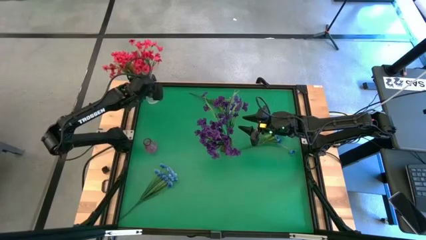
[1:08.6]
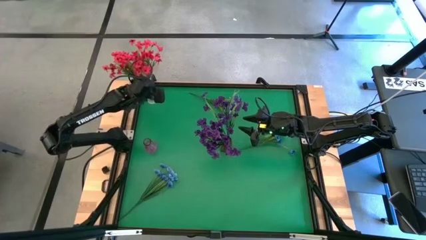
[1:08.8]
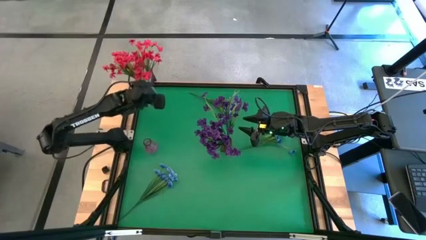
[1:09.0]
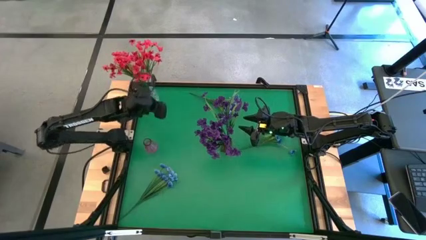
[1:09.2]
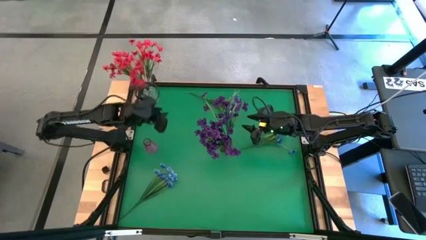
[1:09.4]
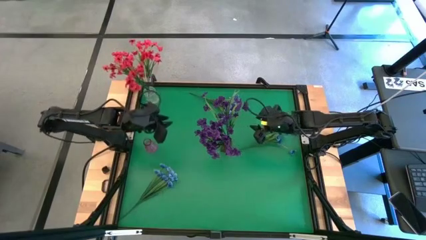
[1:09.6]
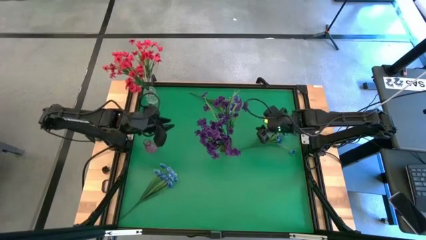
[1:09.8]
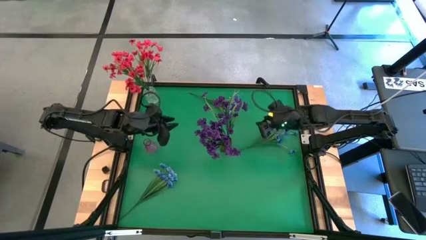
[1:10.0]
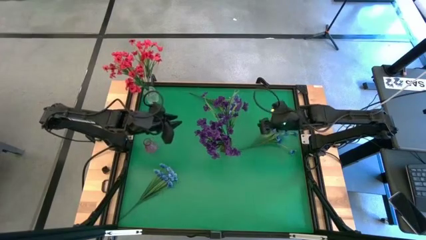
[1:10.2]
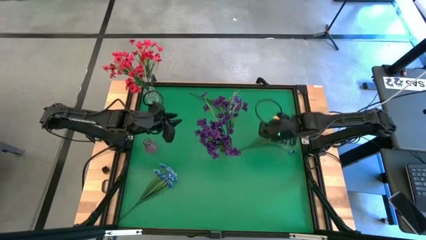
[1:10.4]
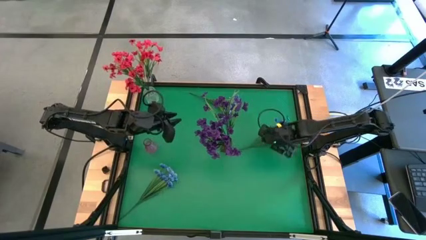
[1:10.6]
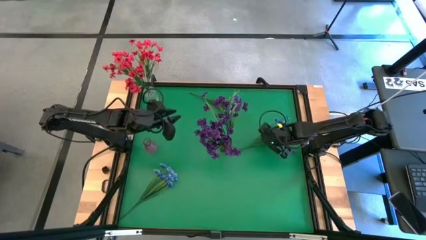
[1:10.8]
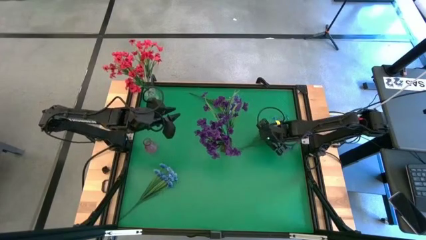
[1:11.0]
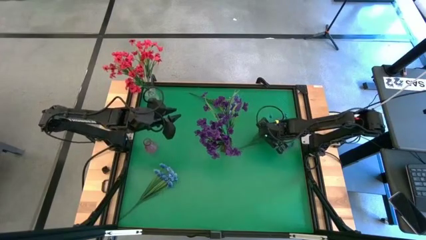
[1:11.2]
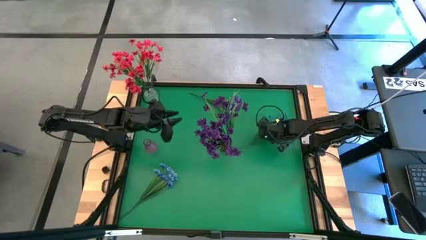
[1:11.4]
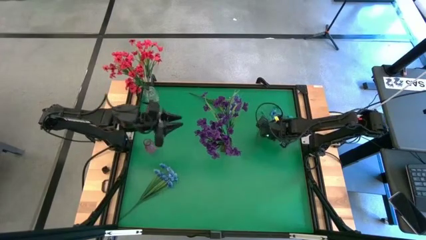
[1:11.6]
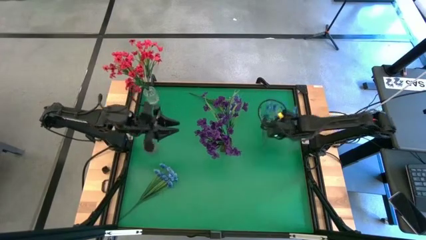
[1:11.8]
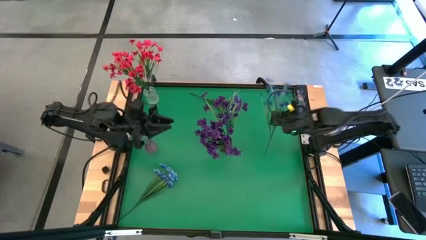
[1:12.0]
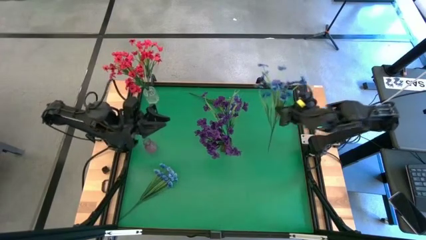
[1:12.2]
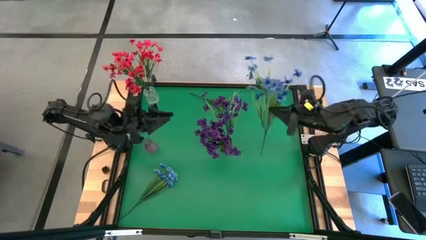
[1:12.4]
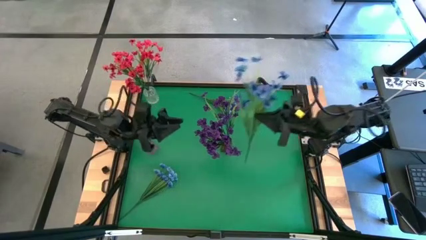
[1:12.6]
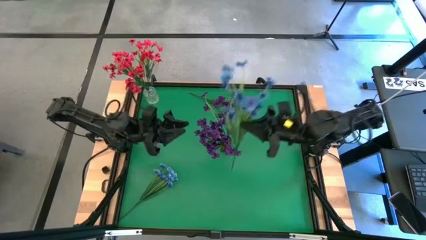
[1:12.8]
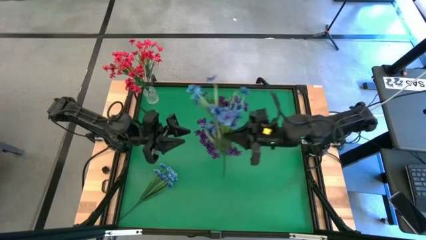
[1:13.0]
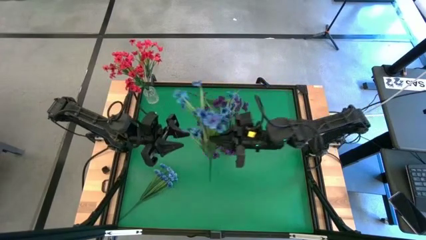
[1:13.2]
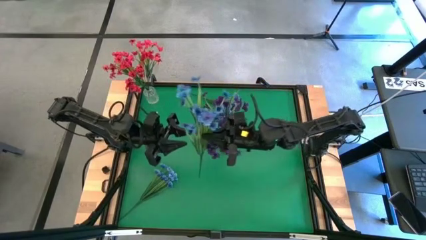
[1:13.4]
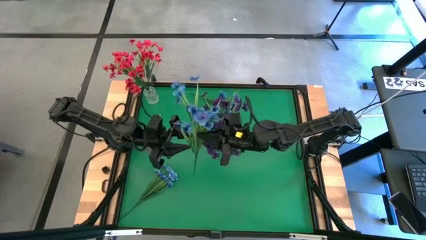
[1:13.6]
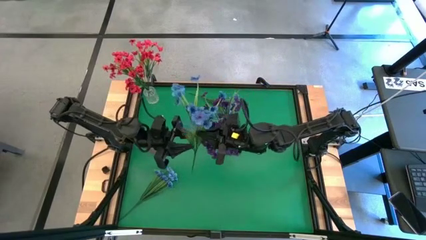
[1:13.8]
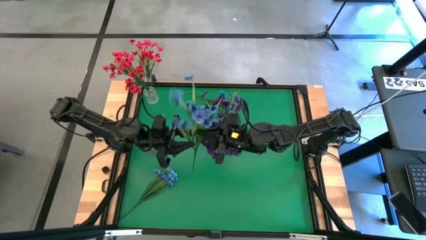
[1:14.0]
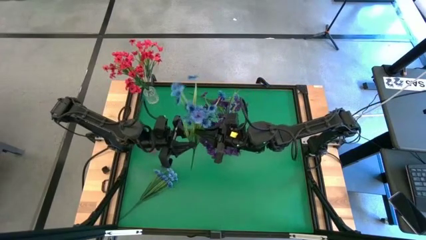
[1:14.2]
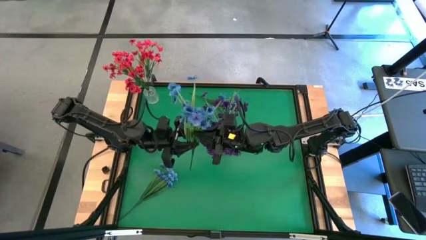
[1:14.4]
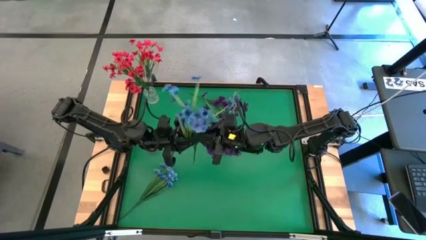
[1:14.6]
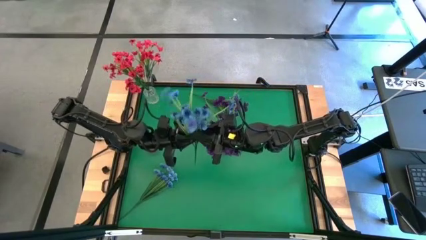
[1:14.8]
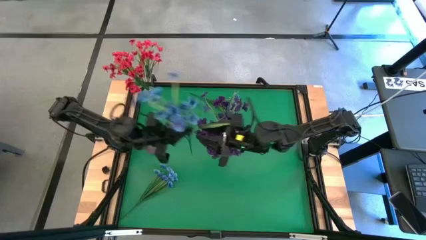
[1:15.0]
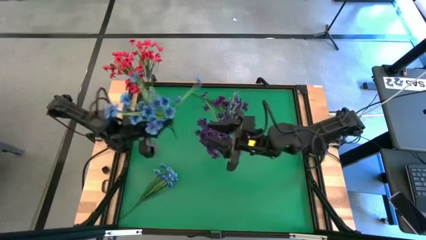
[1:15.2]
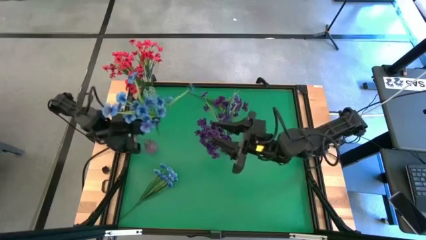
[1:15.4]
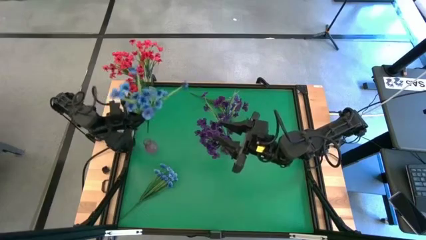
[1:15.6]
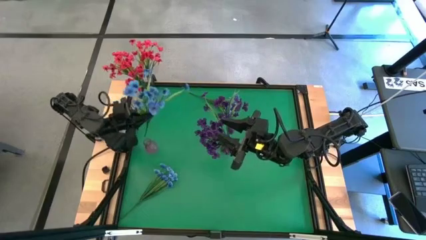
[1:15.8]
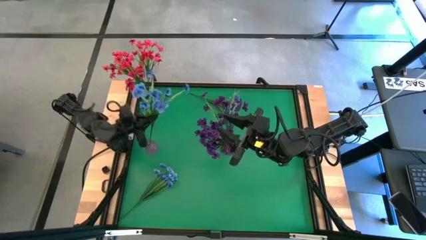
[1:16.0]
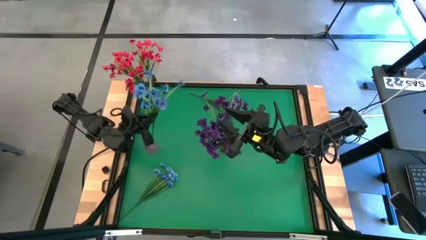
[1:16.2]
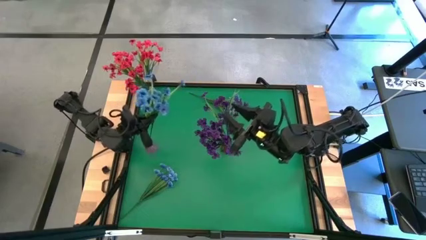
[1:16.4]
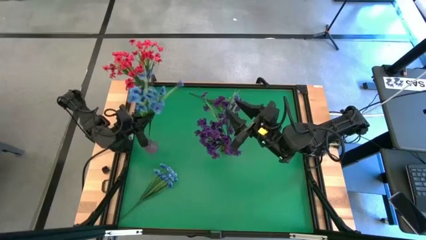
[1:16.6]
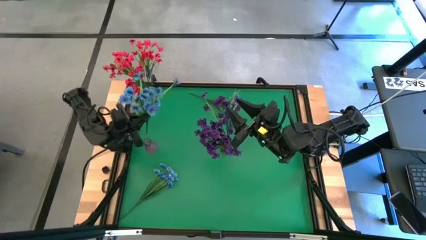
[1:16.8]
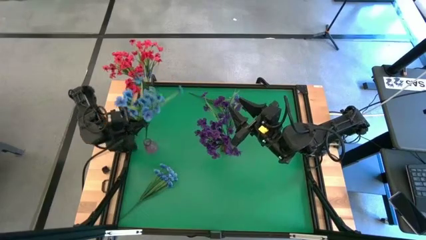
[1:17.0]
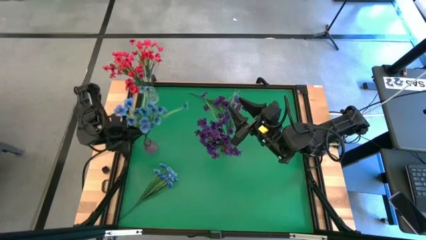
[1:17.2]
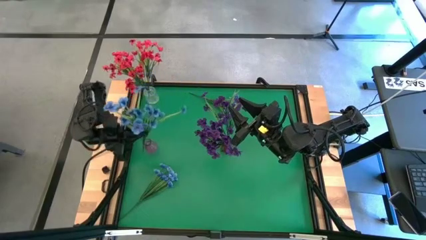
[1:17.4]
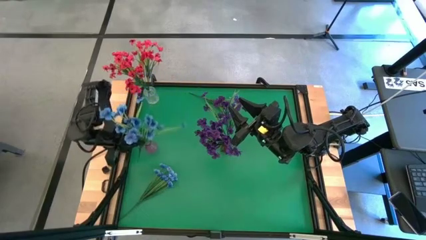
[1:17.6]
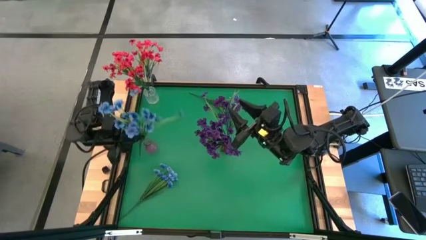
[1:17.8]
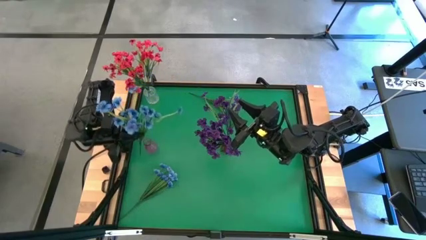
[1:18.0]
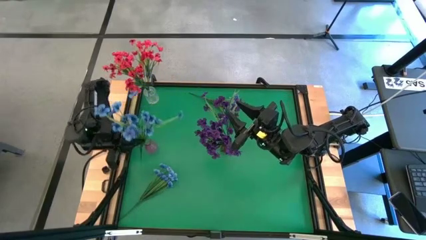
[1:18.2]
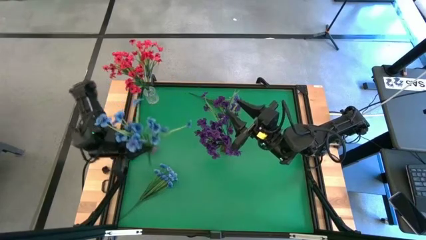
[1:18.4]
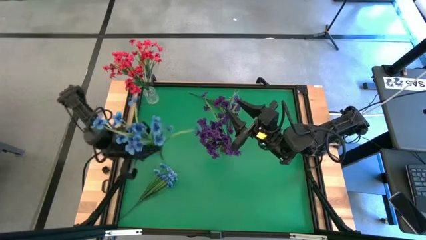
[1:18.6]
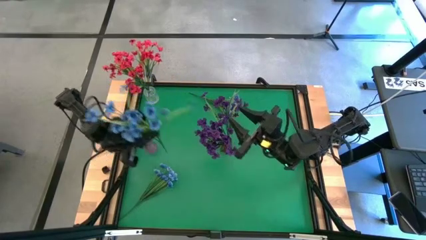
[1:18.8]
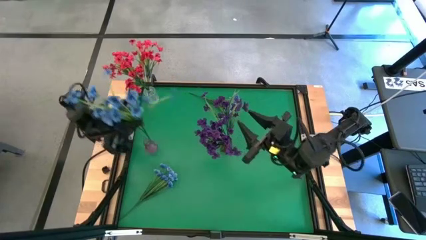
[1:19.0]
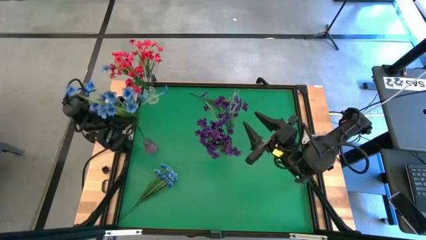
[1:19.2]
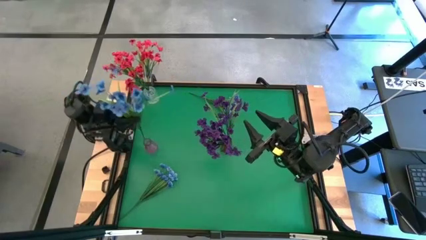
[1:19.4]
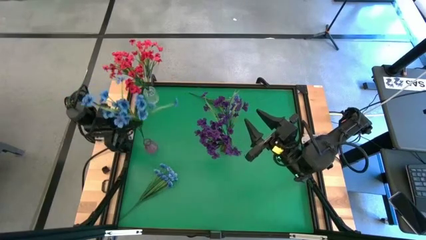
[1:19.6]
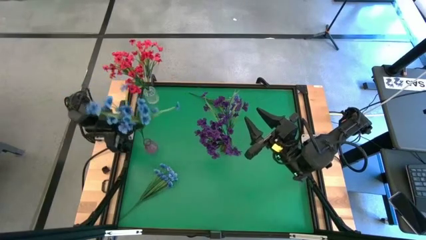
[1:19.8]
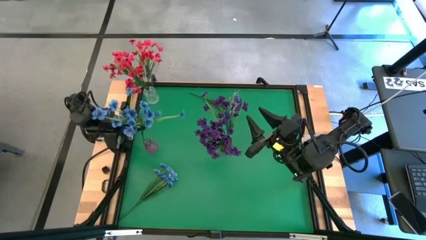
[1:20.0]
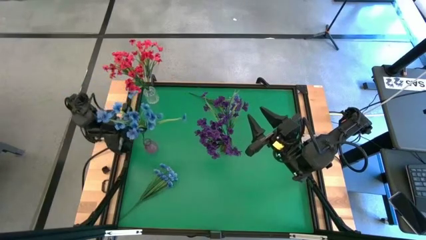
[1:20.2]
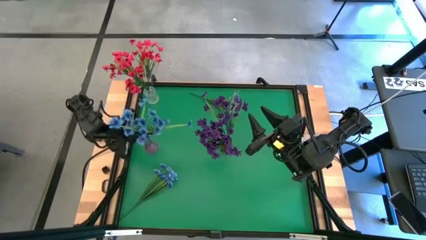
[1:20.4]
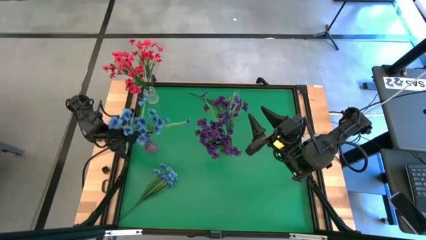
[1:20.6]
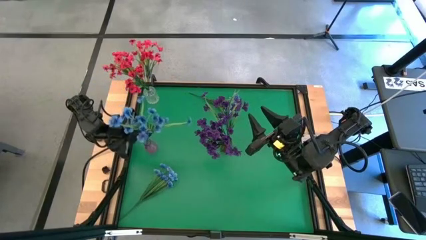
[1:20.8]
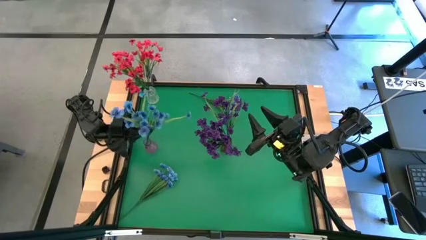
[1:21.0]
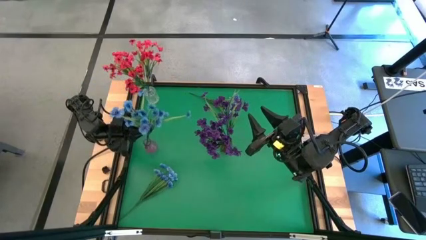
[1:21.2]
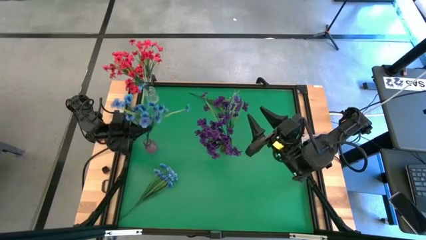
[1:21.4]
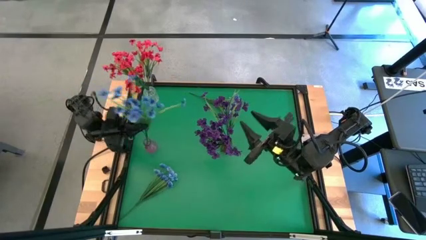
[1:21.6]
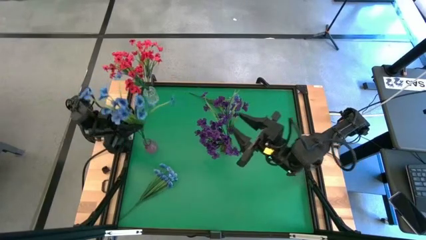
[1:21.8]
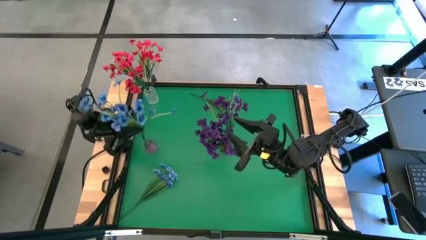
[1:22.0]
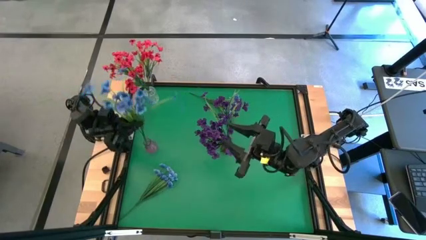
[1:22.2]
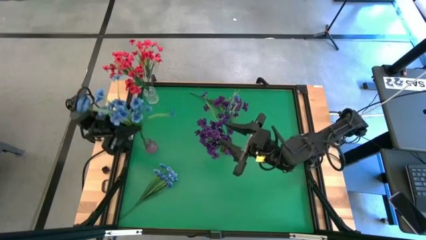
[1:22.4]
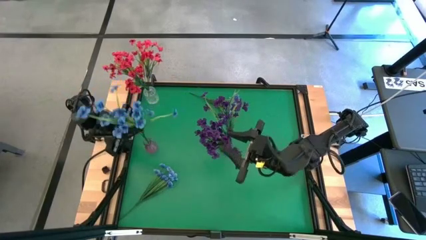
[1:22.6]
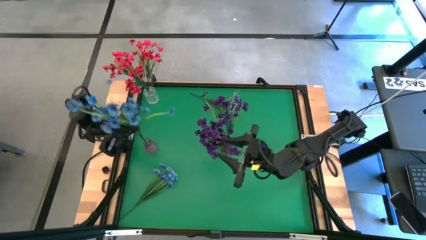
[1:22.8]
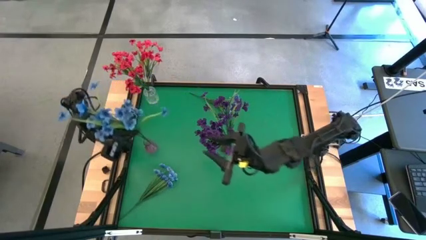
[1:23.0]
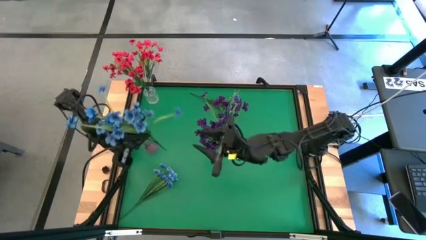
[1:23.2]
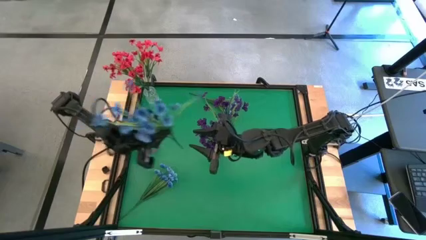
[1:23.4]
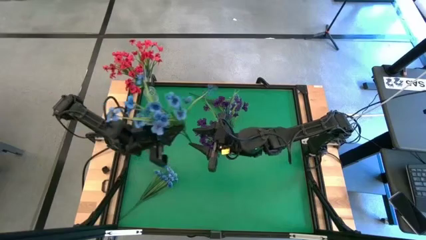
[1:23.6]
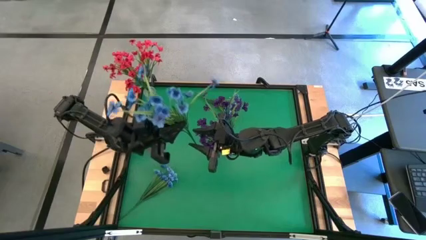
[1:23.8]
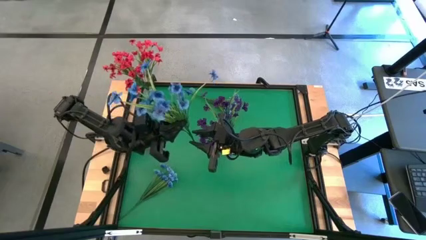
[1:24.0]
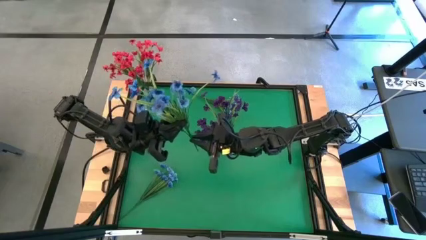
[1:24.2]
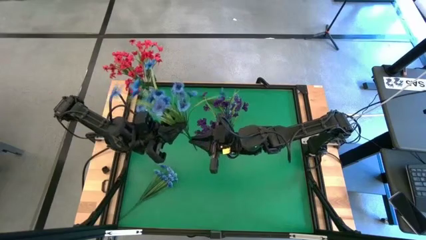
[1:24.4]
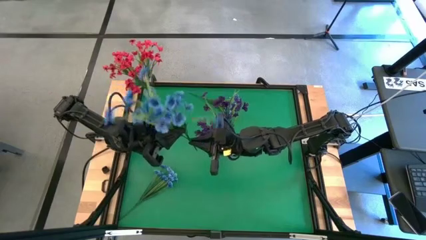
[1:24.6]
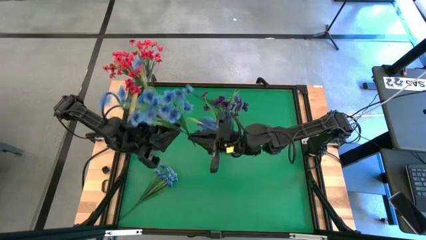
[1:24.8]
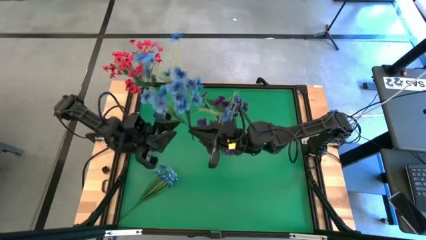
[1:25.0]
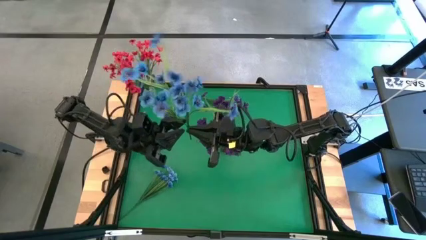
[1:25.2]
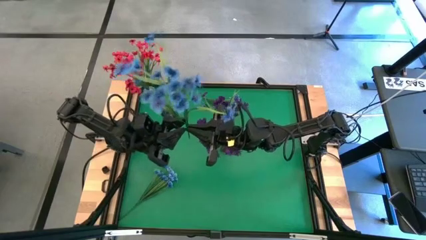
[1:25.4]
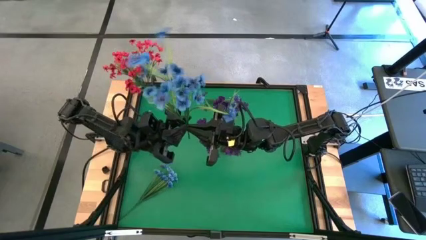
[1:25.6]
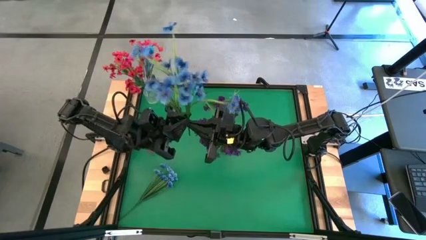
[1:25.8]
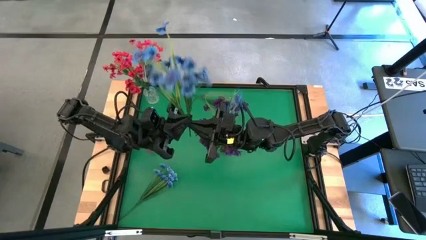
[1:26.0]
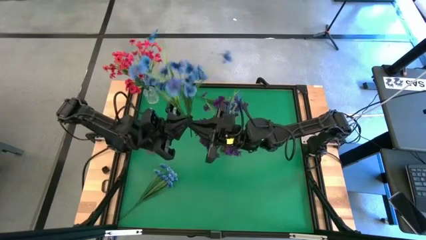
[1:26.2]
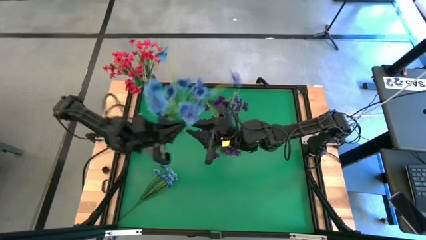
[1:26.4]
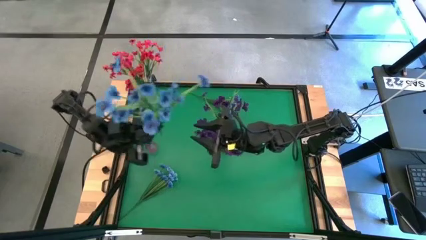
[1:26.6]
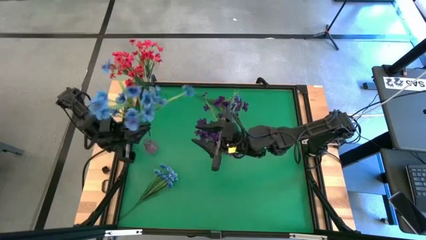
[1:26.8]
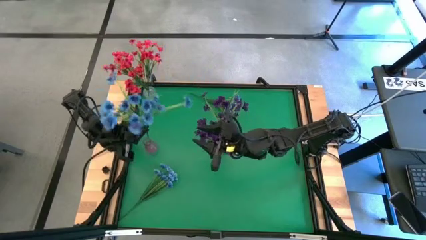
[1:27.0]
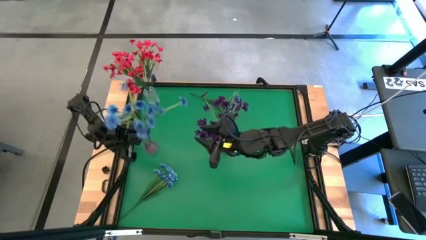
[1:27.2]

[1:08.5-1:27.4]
Task: Sort flowers into vase by color
Put the right blue flowers into the violet vase
